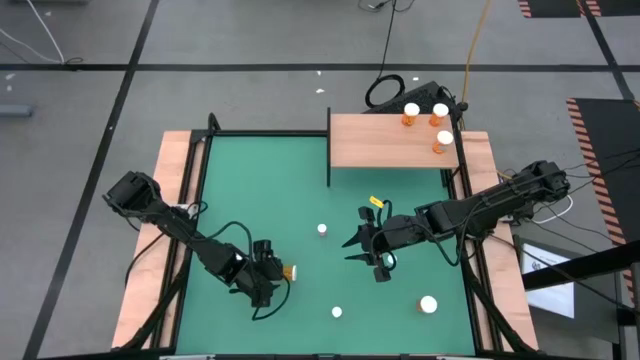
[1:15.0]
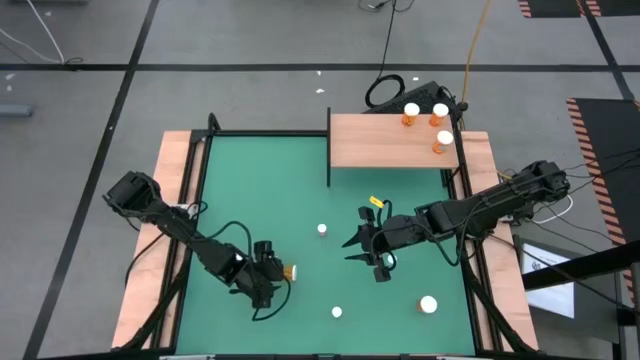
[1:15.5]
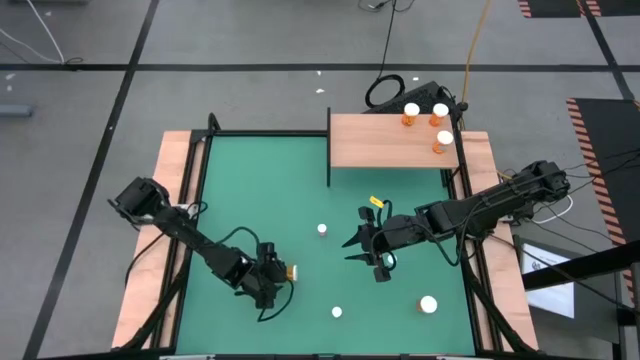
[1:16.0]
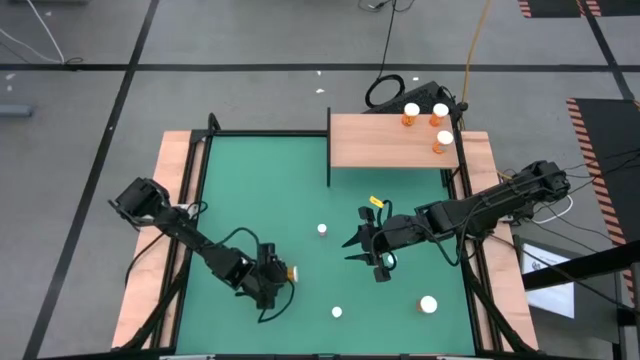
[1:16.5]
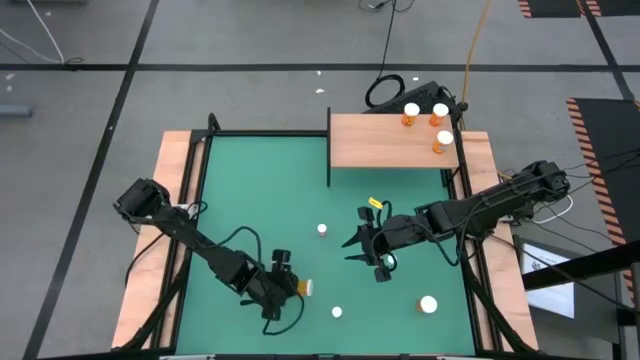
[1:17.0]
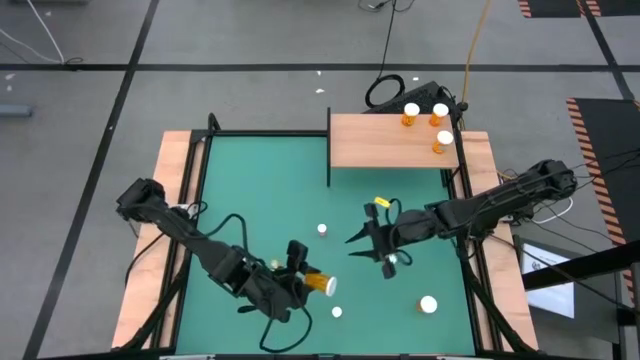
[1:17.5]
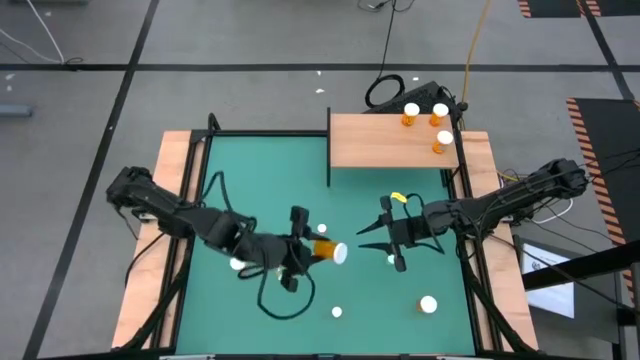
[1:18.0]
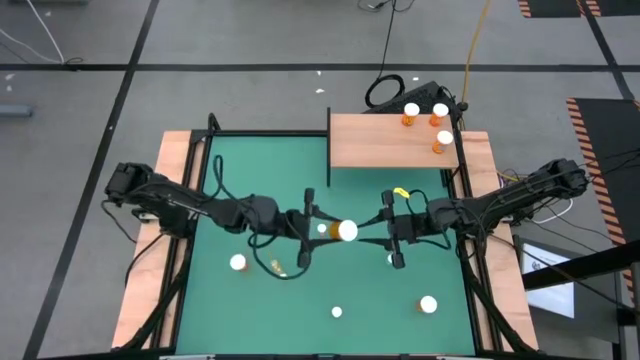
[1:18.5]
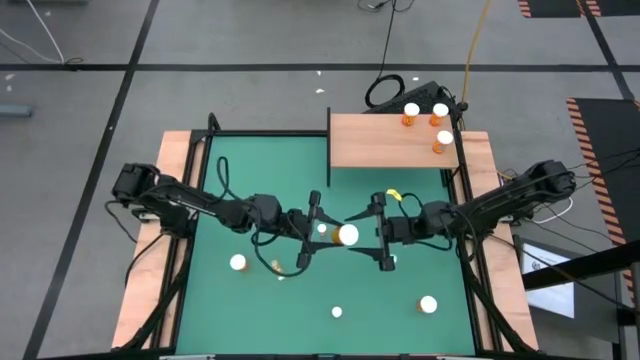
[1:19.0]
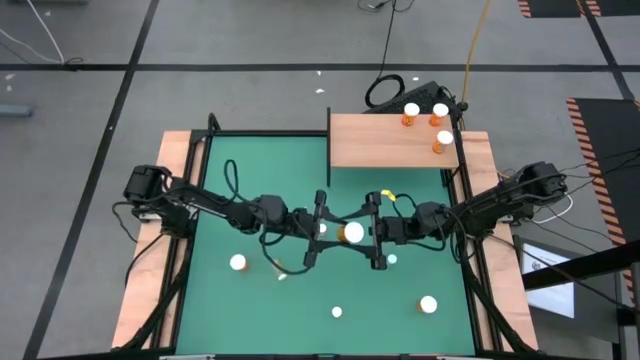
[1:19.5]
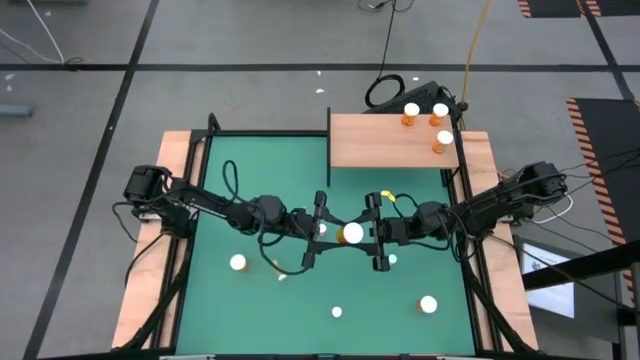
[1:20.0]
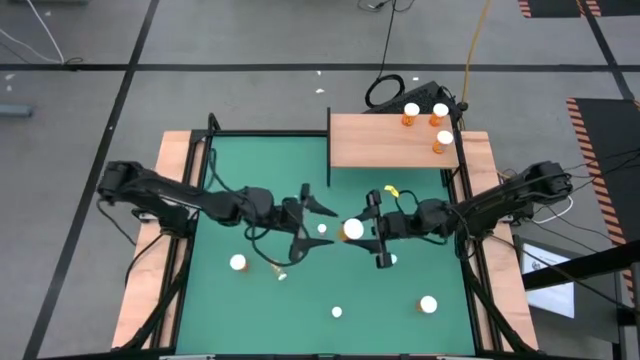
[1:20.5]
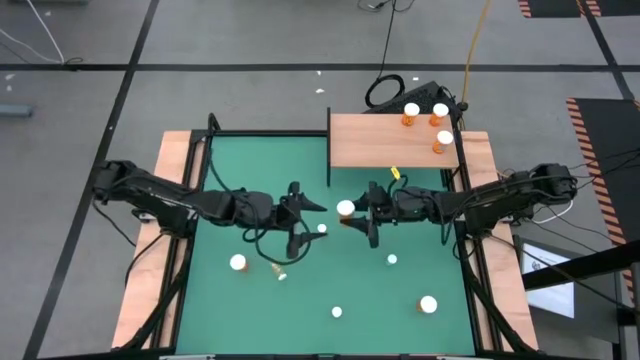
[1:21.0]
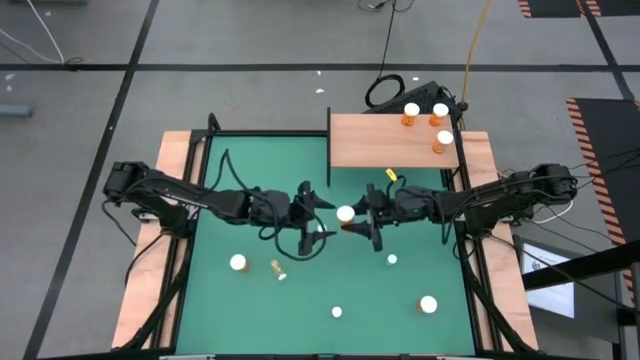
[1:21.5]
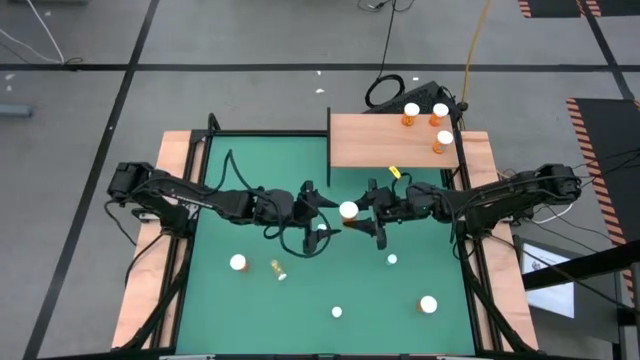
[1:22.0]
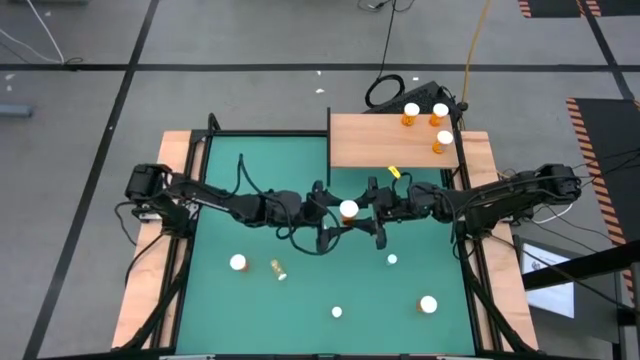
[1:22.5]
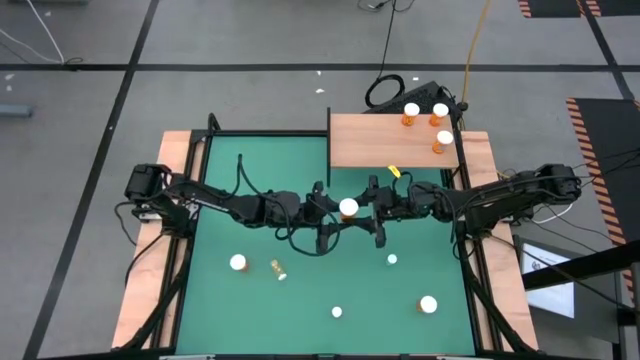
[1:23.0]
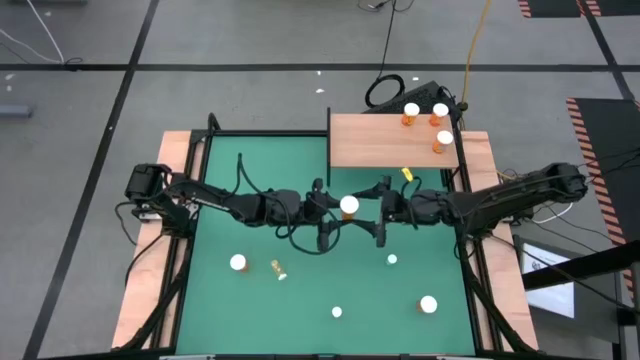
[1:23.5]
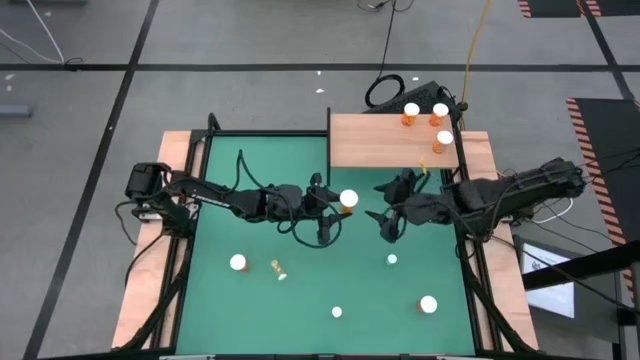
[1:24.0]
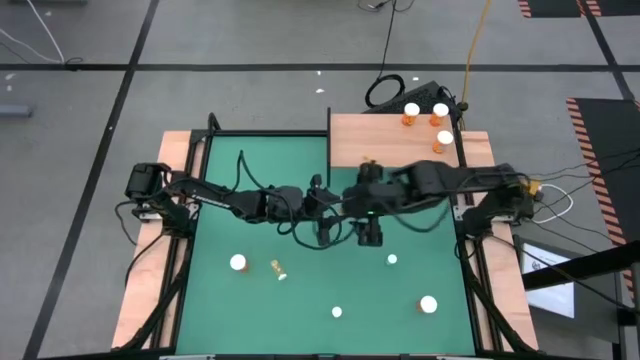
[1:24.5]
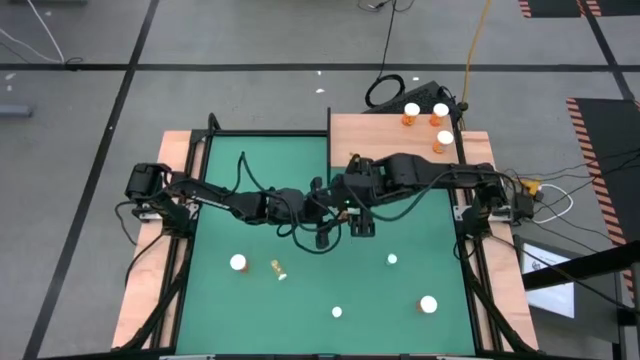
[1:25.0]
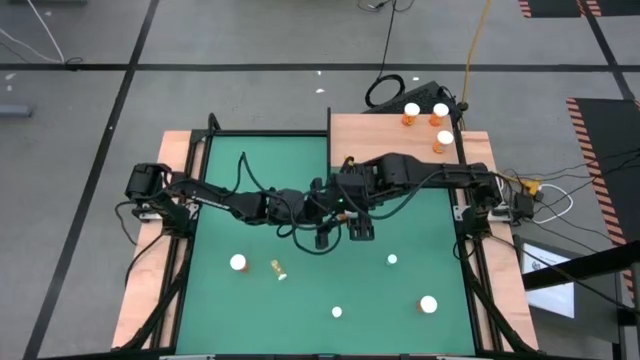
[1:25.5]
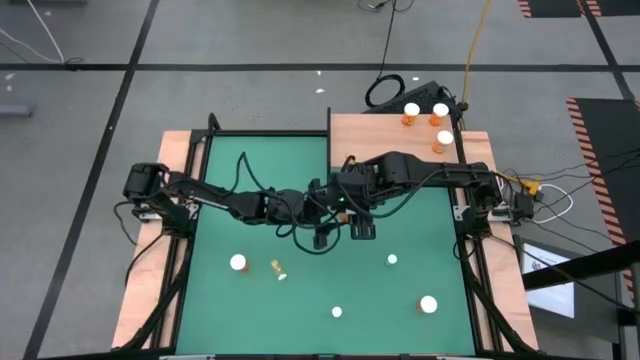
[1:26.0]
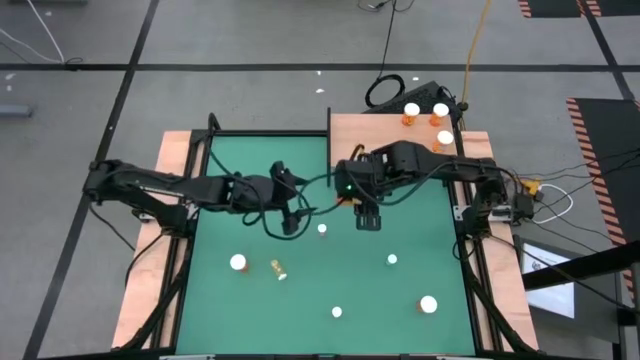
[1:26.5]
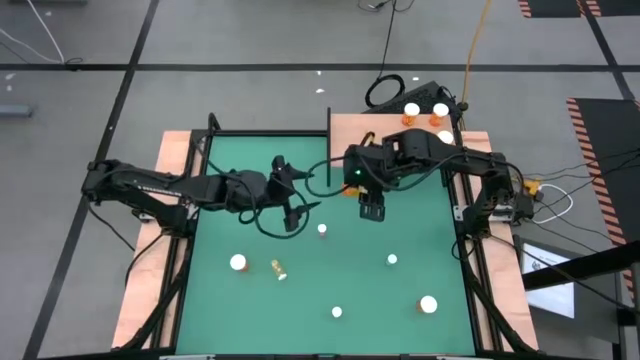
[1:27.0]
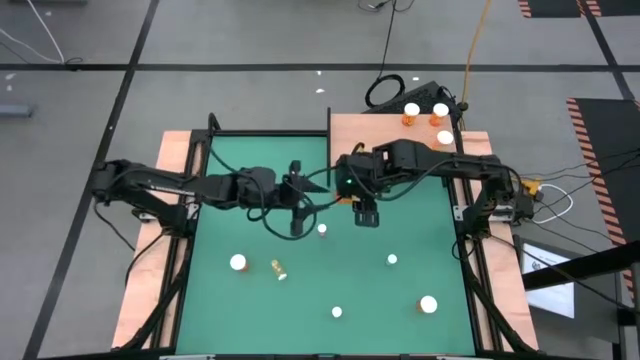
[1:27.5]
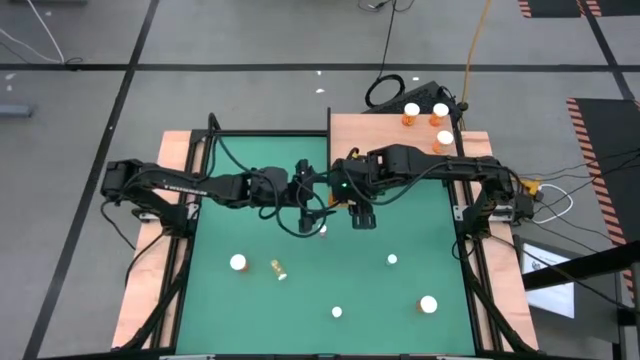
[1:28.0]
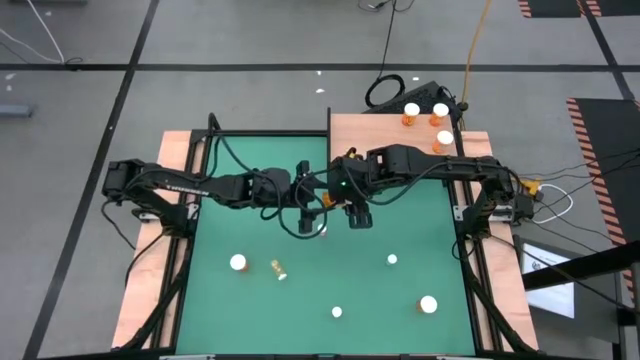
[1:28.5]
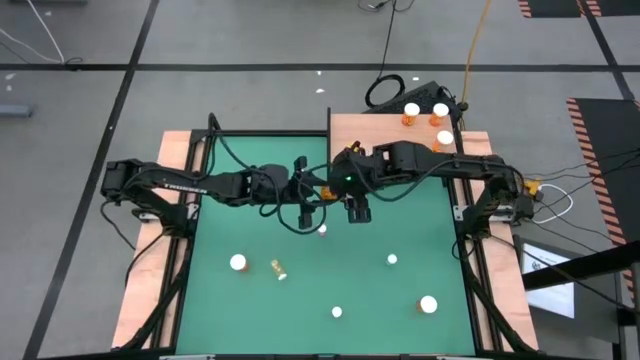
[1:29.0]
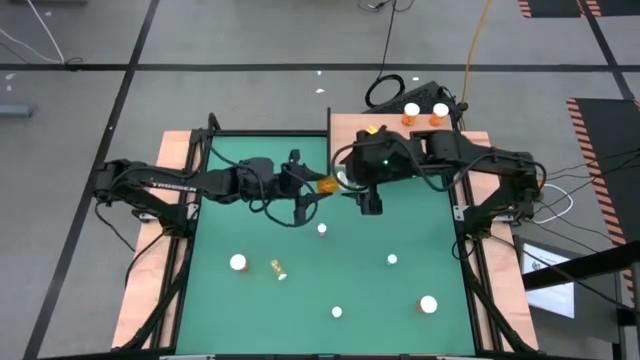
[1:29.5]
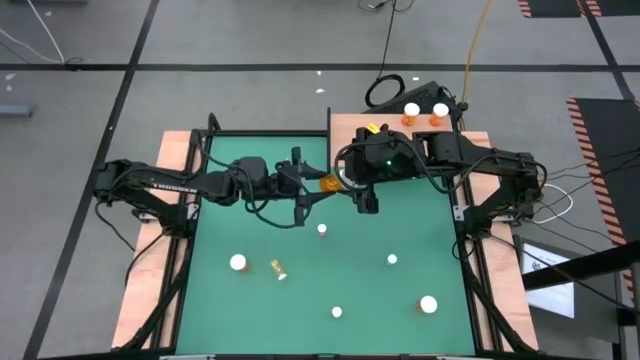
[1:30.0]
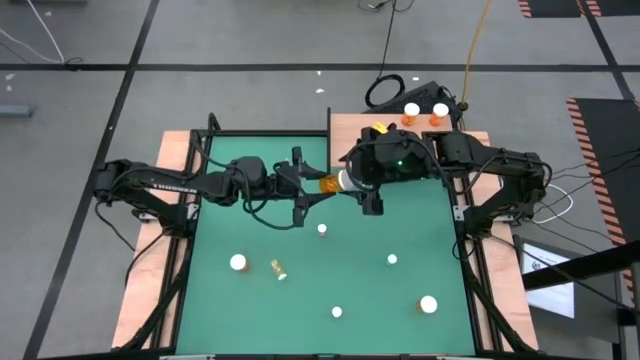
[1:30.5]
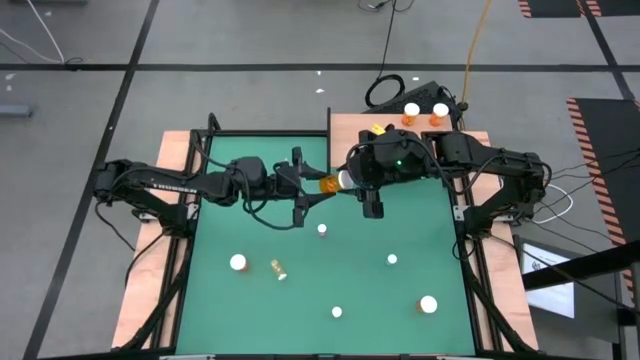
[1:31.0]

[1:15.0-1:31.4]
Task: Pick and place medicine bottles onto shelf by color
Put the orange pill bottle on the shelf

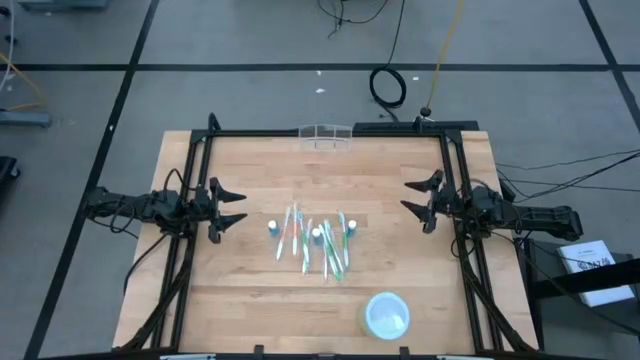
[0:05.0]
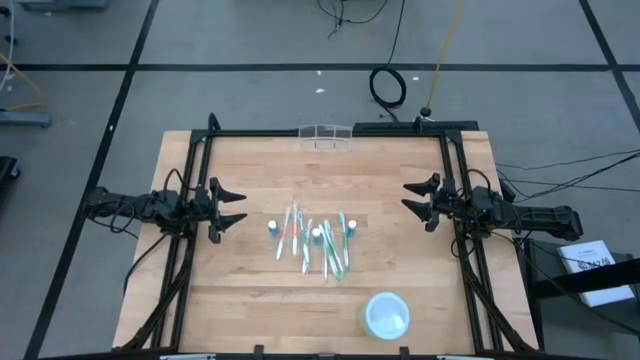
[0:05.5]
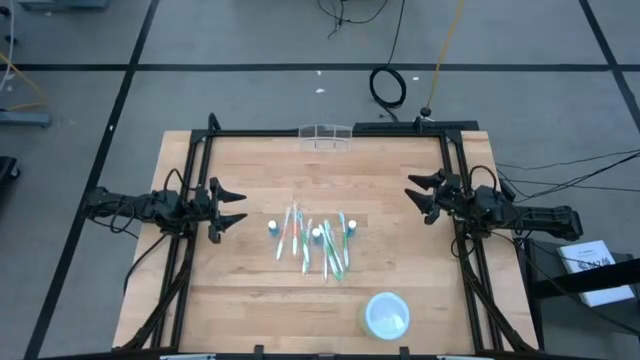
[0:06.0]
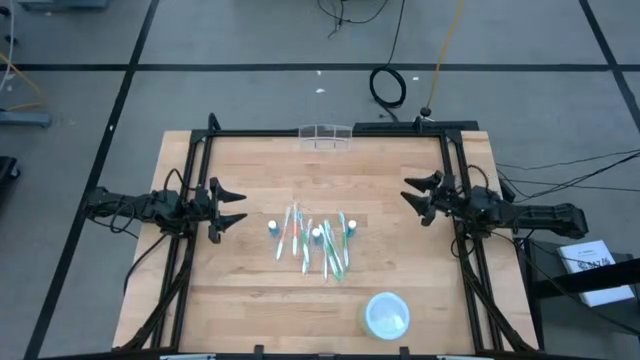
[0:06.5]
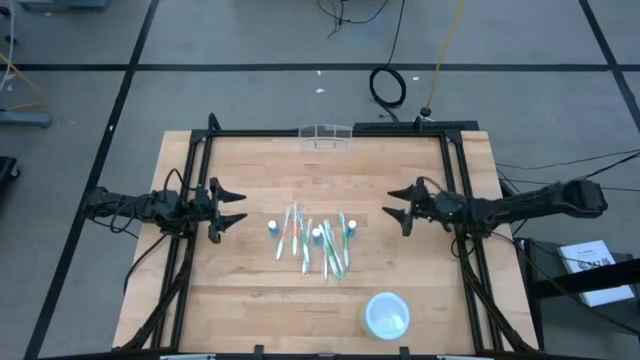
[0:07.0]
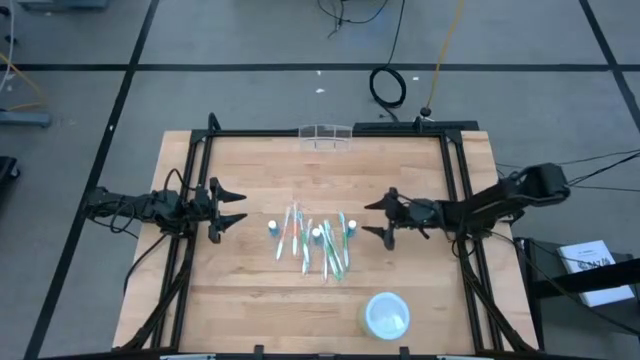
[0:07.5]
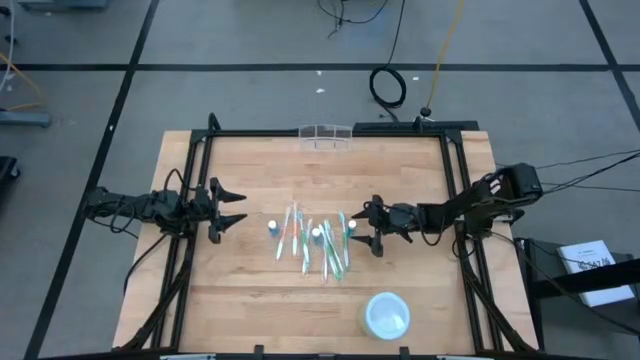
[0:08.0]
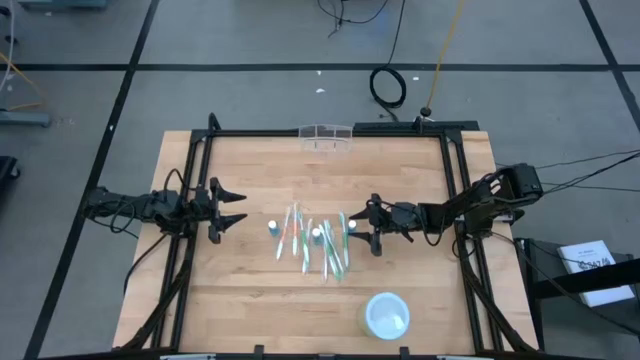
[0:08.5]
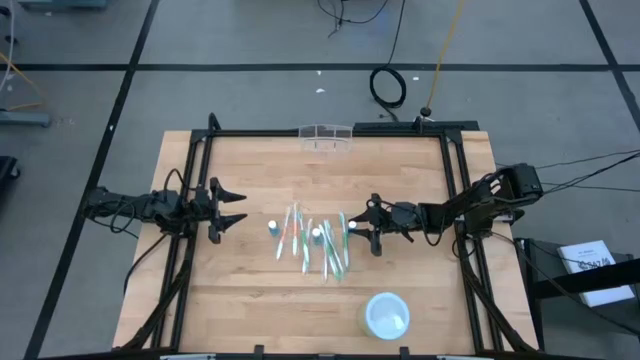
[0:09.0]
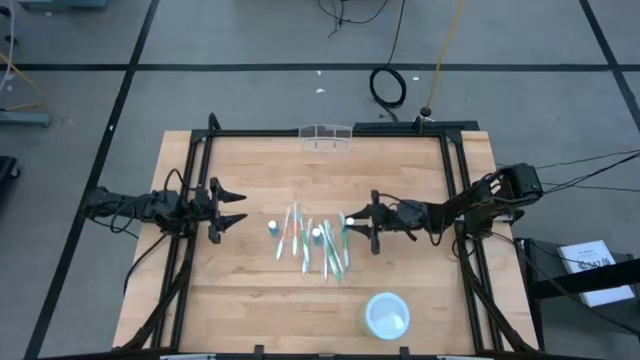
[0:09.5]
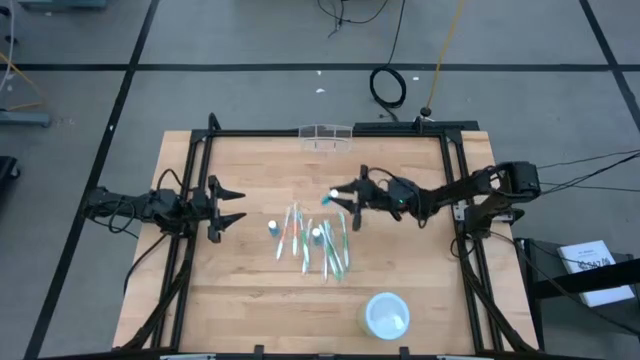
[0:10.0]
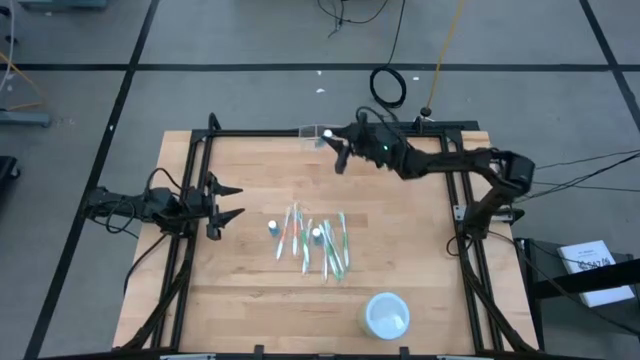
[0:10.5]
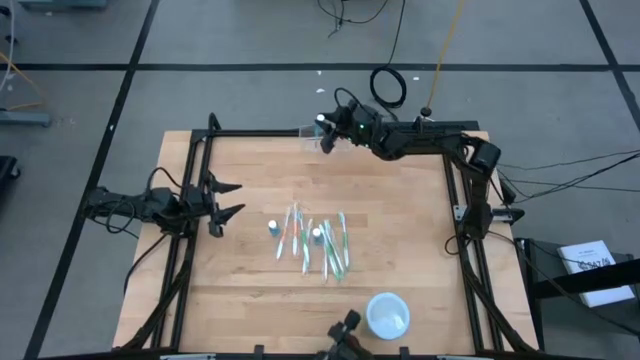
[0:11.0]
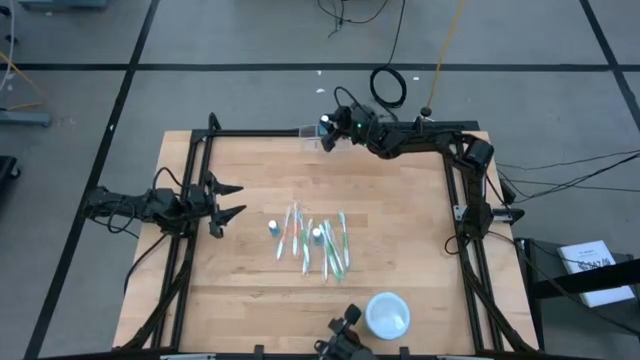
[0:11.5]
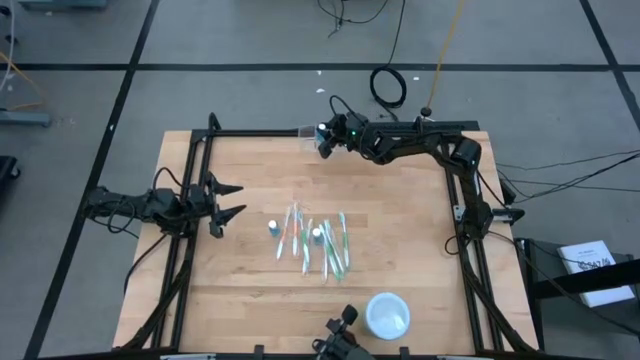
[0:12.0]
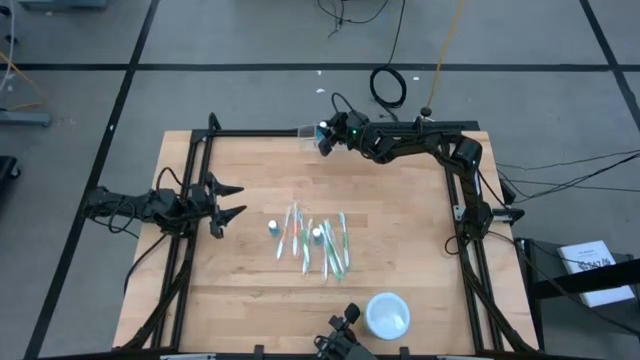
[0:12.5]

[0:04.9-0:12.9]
Task: Pick & Place toothbrushing station
Put the blue mouthwash into the transparent organizer
